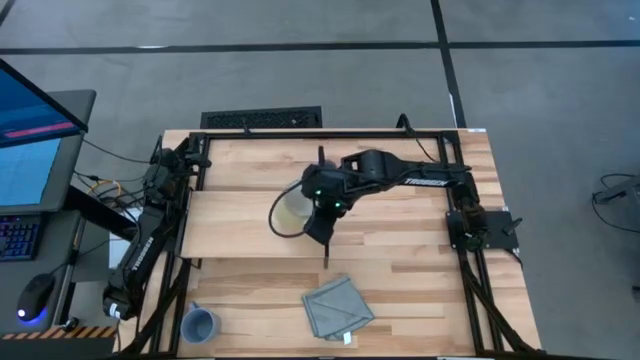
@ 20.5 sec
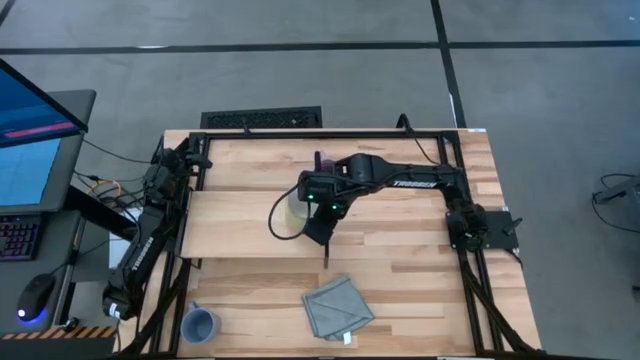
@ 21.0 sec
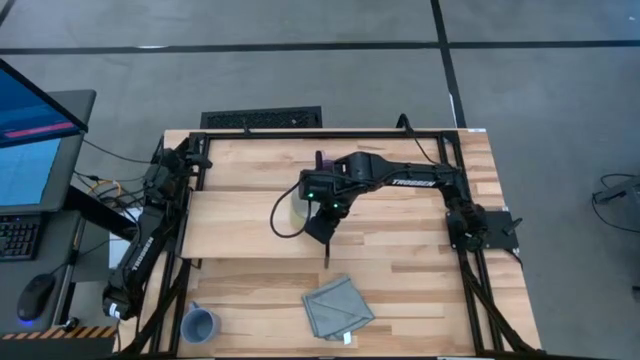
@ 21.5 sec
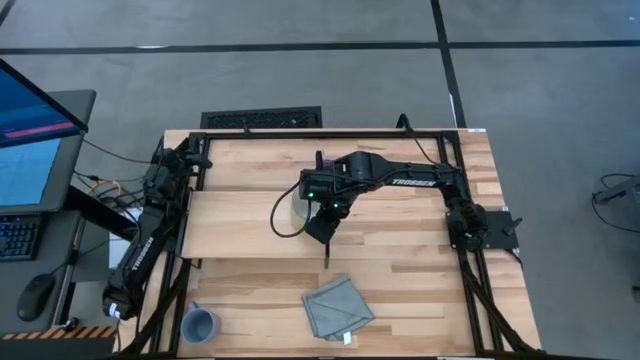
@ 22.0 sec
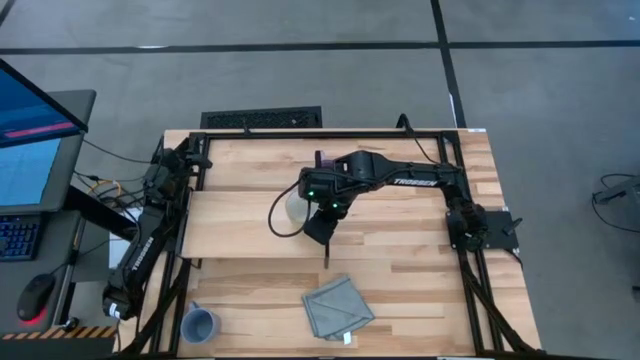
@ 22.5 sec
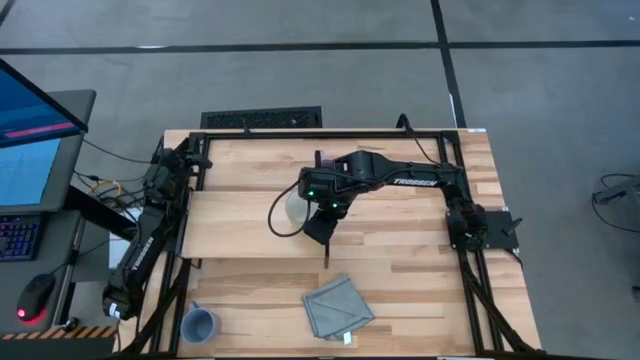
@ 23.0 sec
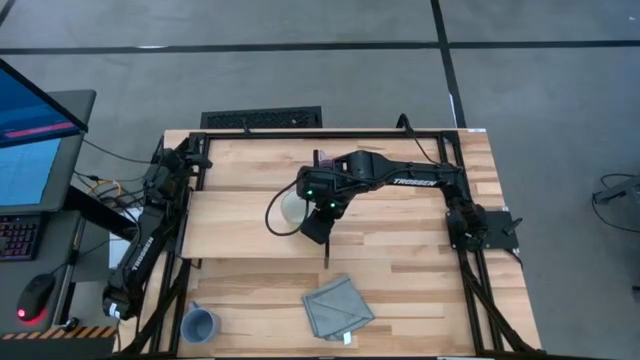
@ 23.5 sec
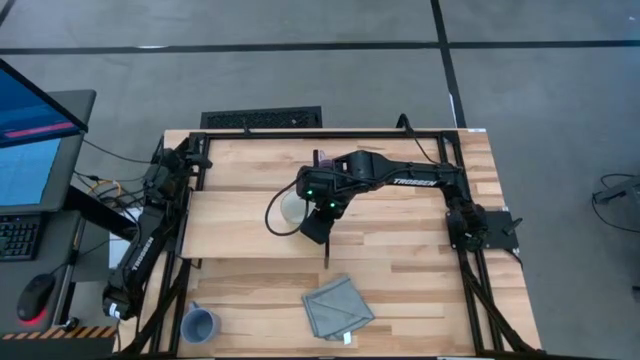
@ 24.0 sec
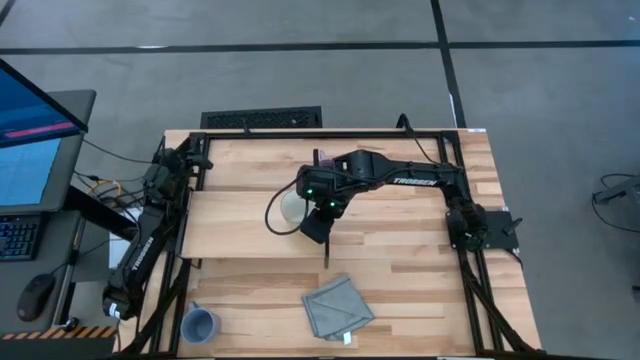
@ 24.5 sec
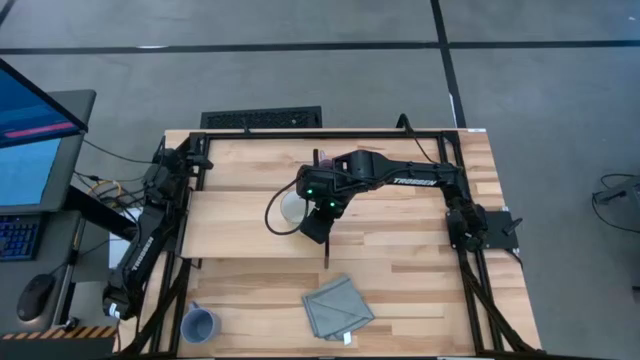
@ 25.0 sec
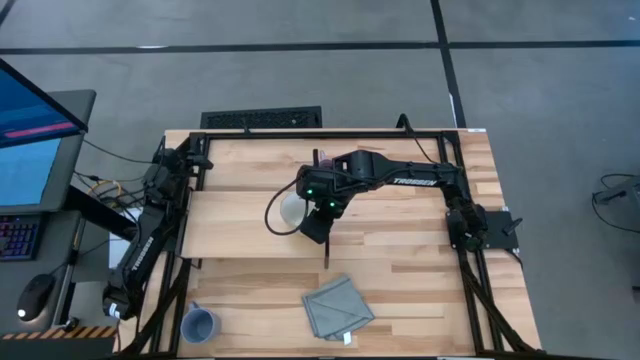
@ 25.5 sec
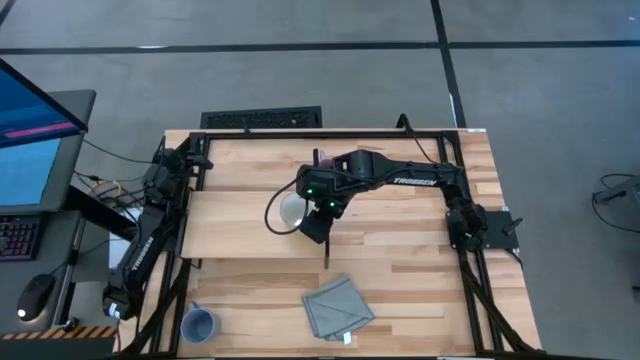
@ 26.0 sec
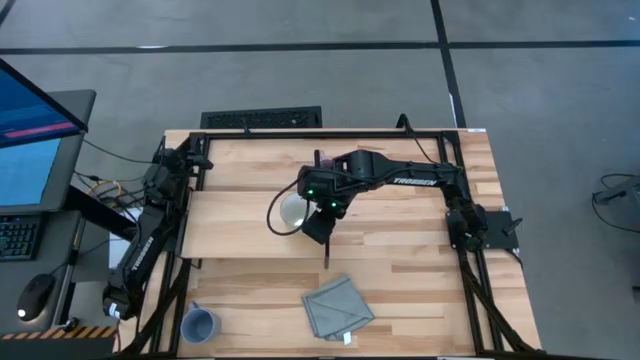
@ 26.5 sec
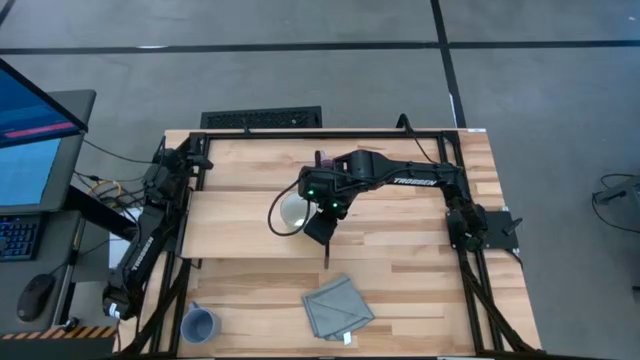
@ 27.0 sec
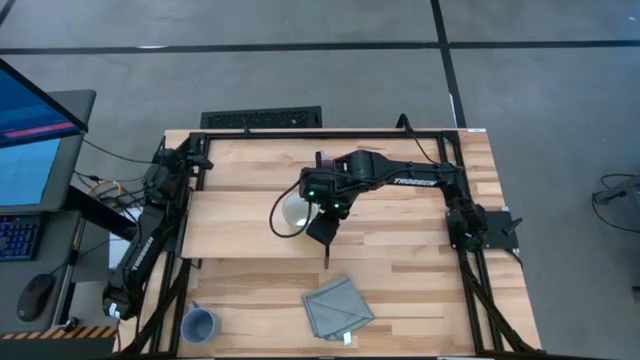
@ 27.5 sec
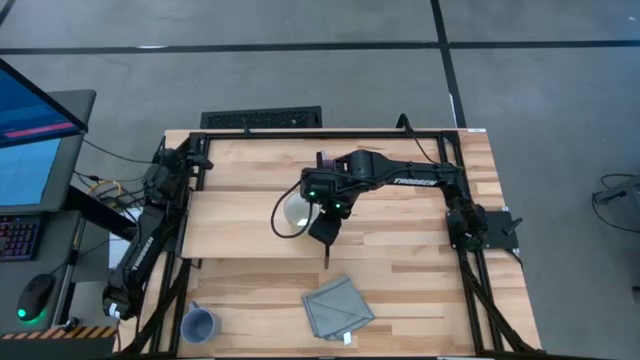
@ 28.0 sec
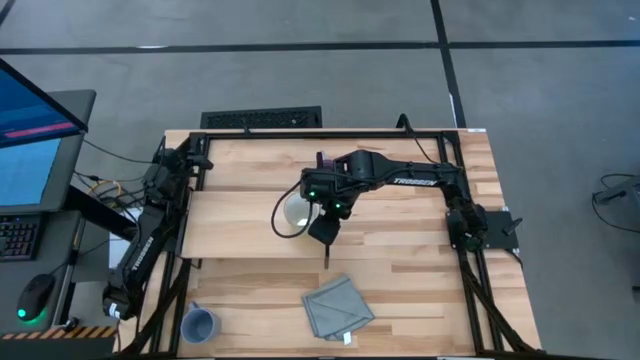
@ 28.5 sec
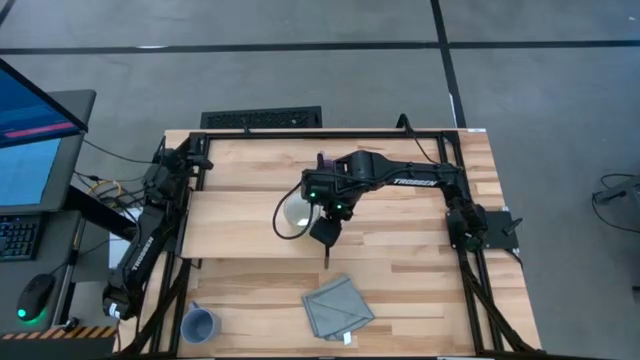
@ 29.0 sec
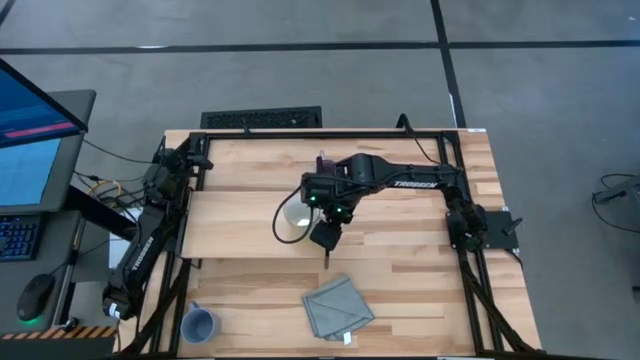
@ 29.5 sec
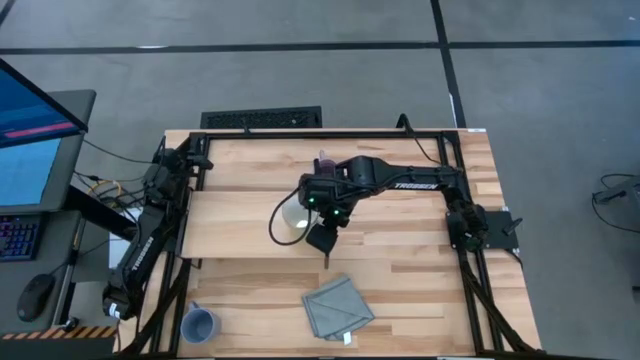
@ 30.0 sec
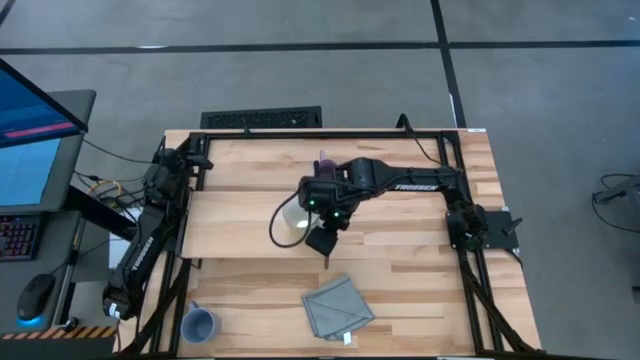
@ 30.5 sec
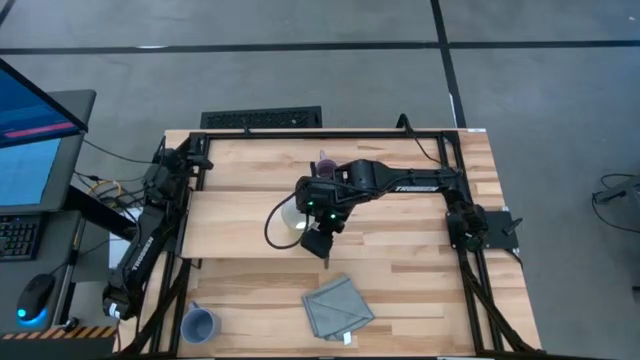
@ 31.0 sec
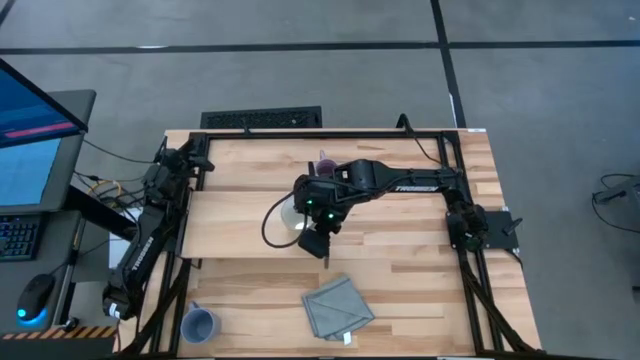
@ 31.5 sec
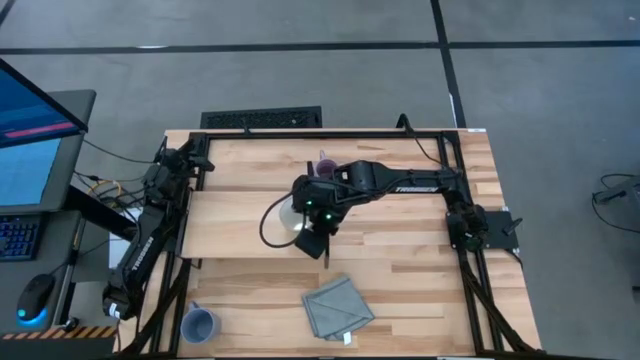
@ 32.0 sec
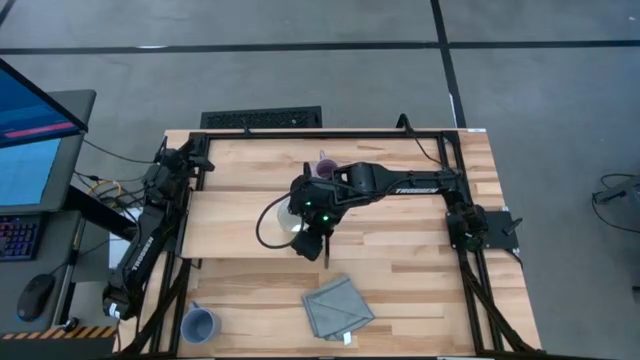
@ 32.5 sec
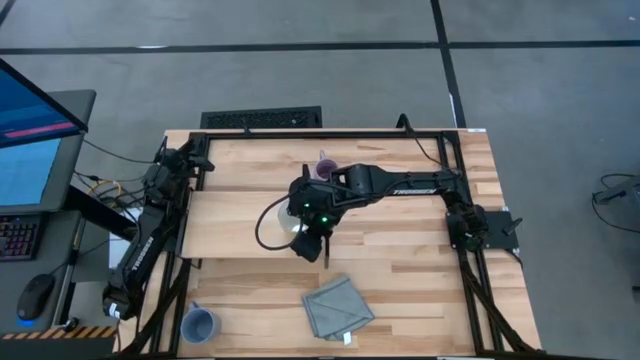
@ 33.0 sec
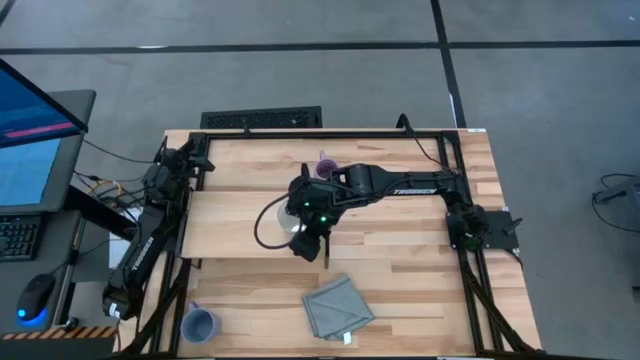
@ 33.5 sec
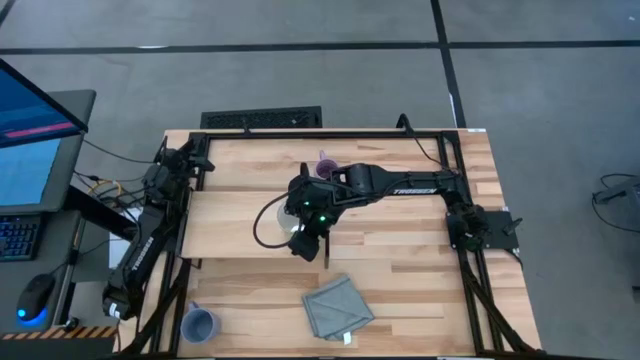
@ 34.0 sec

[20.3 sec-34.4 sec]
Task: Stack small to large cups/mugs on shelf
Put the white mug on the shelf

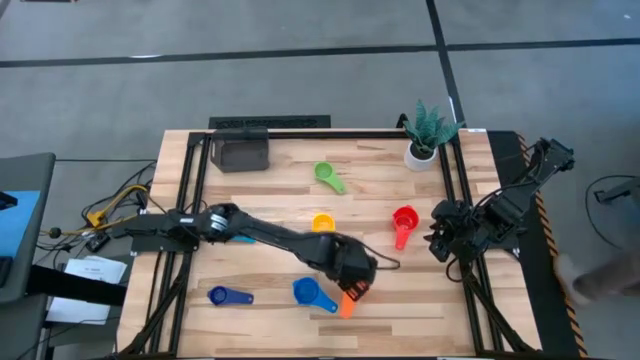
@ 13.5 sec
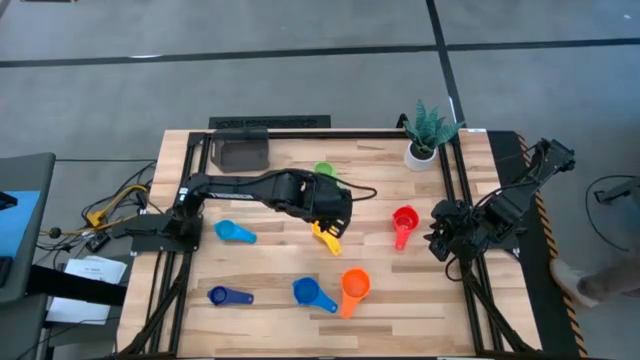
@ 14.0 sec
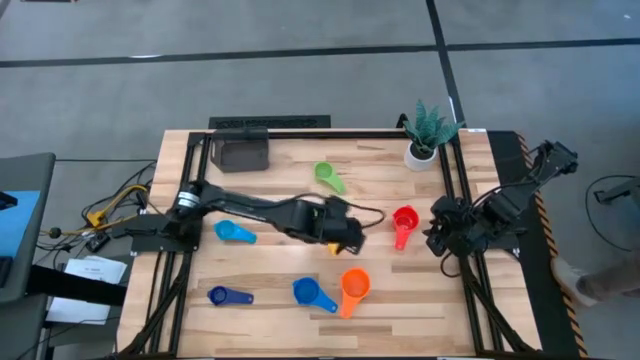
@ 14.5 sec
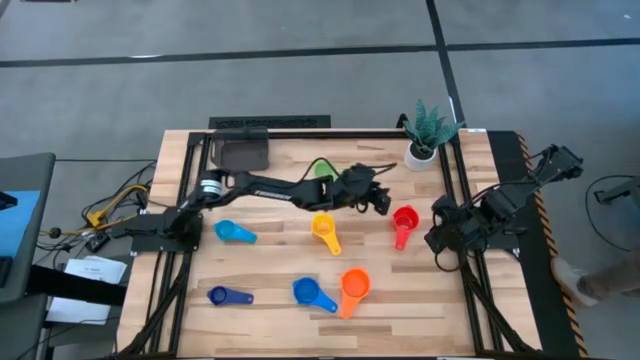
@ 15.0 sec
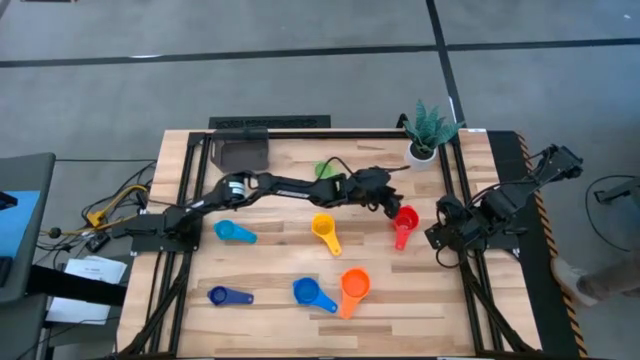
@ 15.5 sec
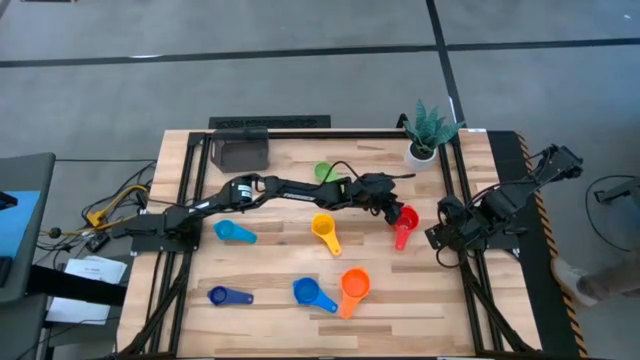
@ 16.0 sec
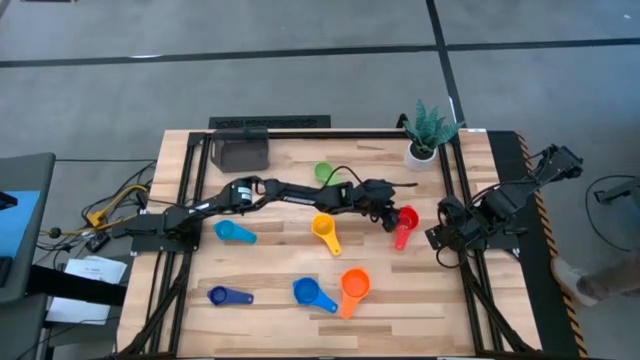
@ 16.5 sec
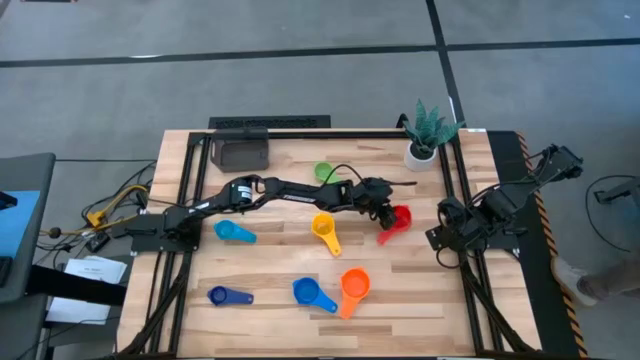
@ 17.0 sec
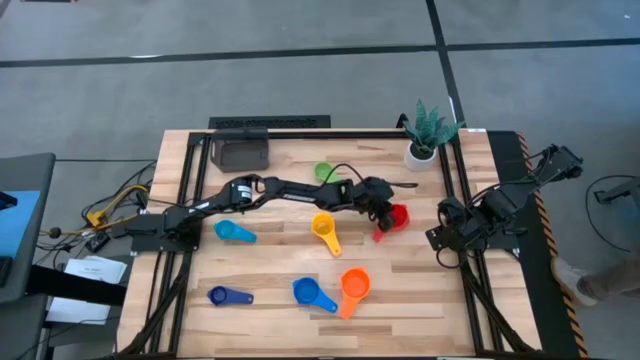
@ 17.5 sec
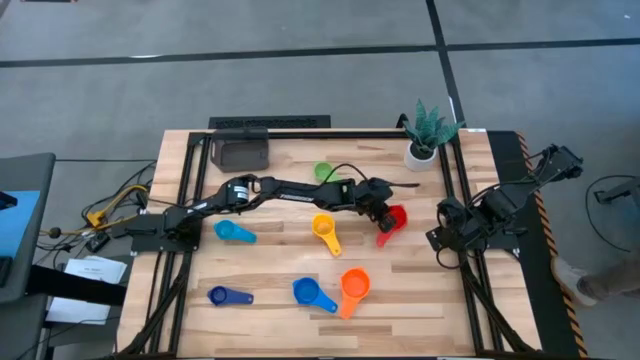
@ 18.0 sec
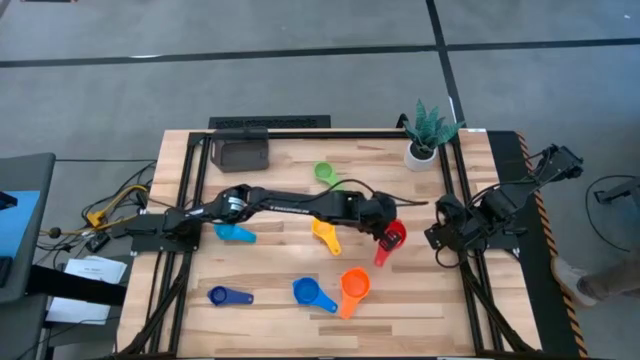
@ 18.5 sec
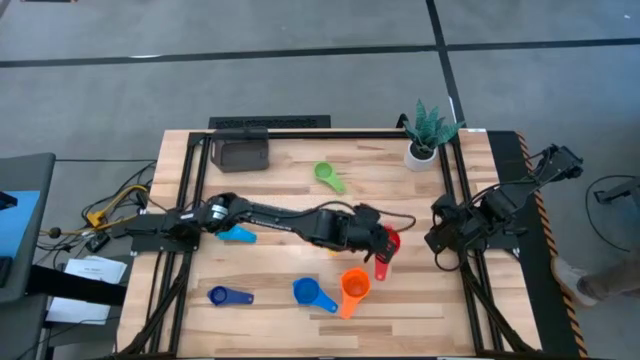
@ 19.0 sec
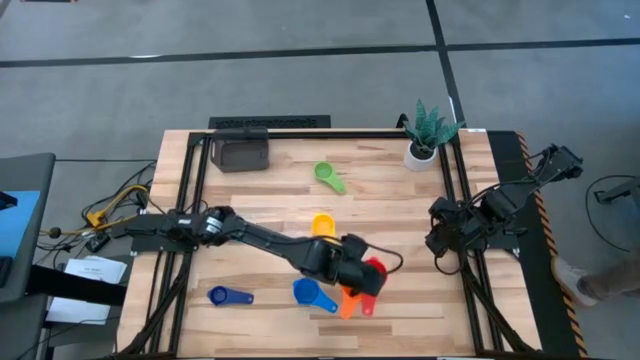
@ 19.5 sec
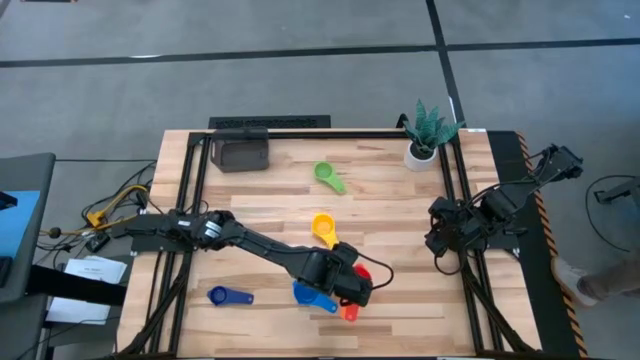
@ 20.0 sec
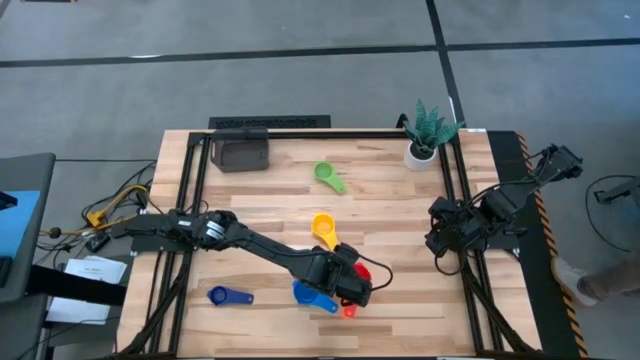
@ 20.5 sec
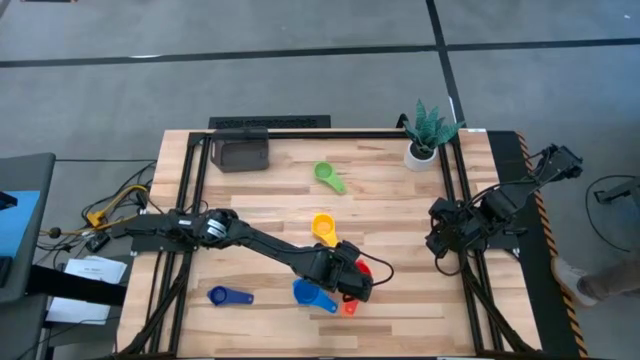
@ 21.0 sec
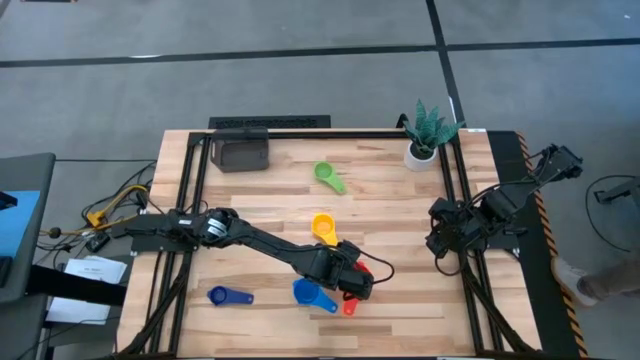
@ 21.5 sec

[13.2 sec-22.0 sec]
Task: Nest measuring cups in basket
Stack the red measuring cup on top of the orange measuring cup
